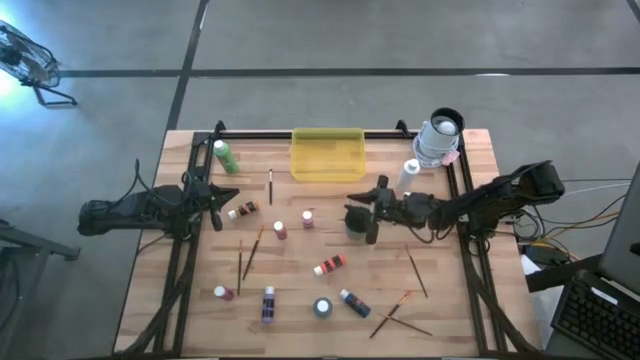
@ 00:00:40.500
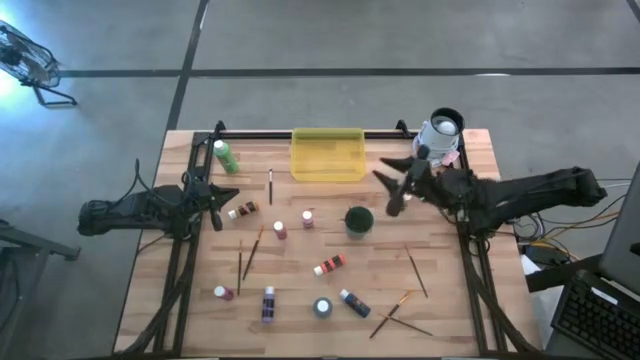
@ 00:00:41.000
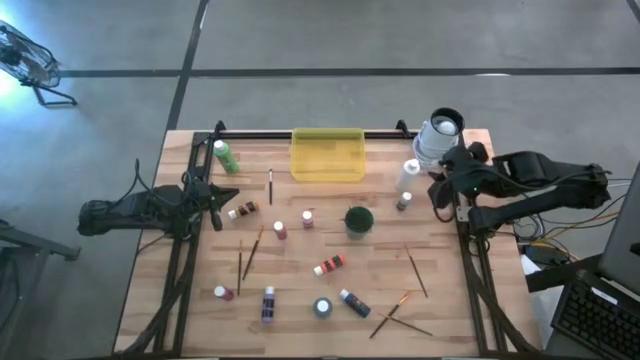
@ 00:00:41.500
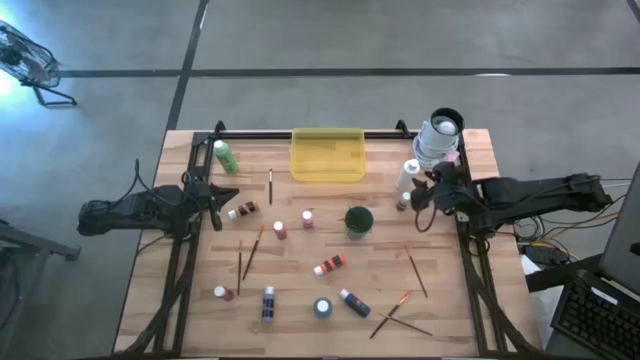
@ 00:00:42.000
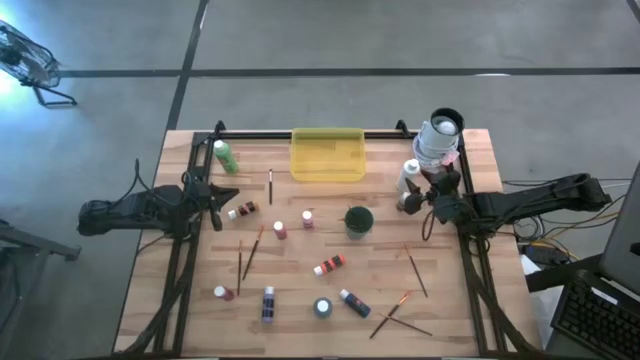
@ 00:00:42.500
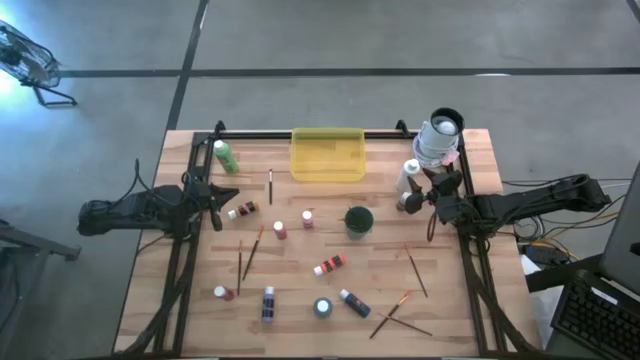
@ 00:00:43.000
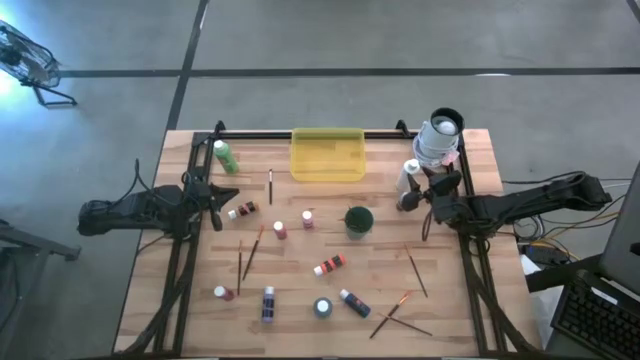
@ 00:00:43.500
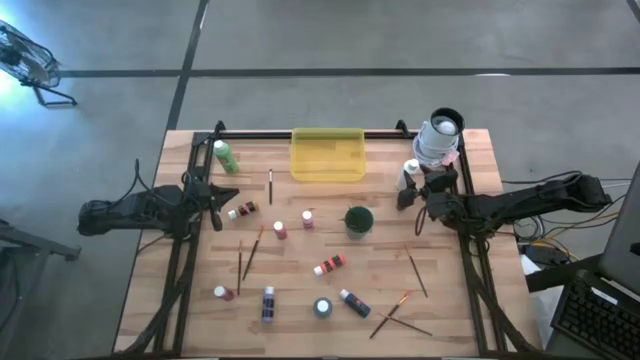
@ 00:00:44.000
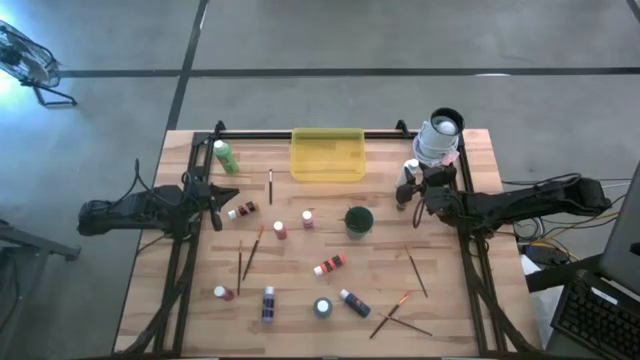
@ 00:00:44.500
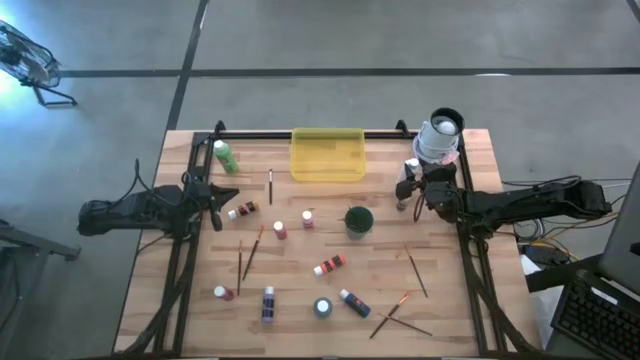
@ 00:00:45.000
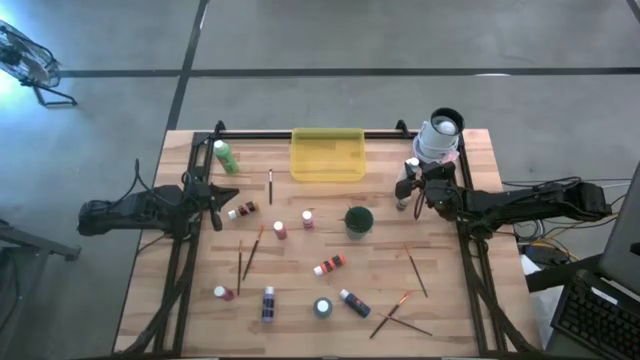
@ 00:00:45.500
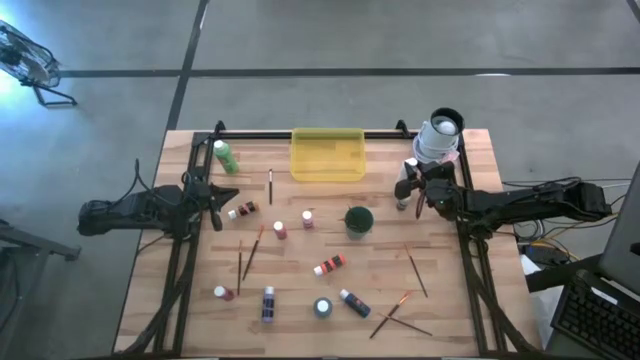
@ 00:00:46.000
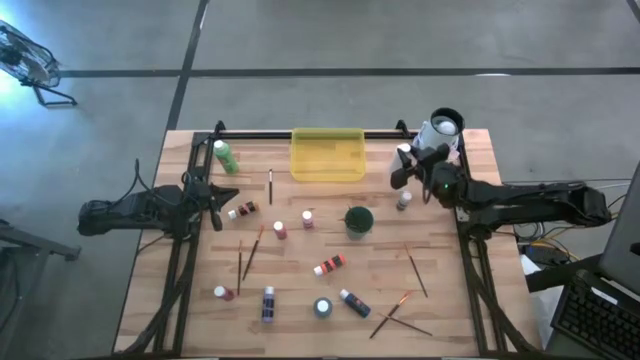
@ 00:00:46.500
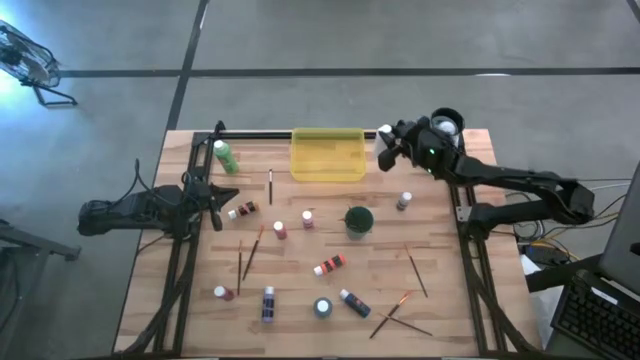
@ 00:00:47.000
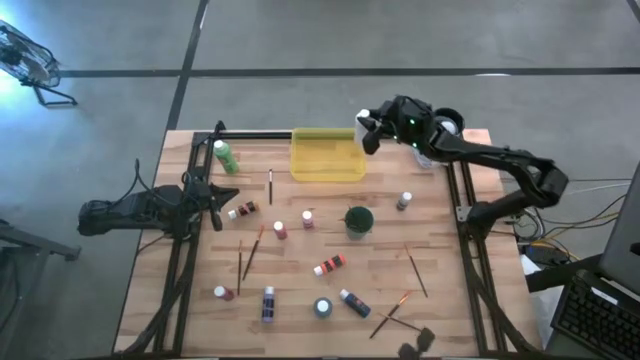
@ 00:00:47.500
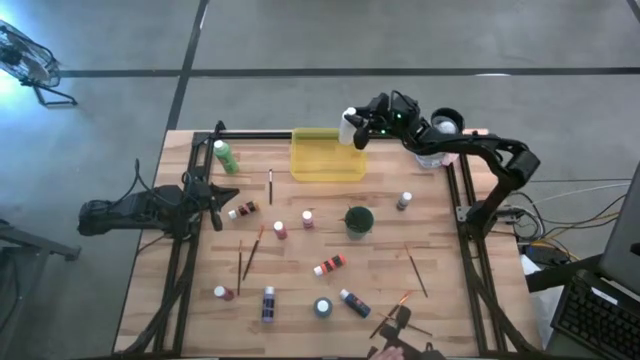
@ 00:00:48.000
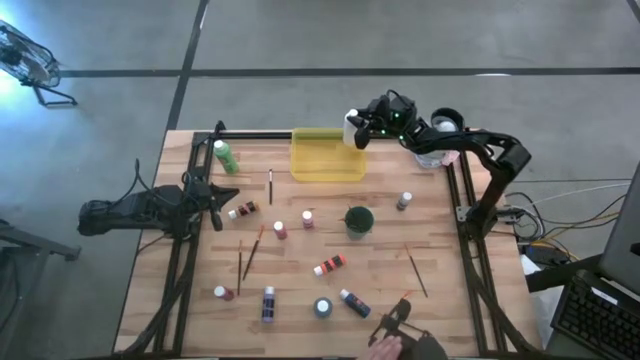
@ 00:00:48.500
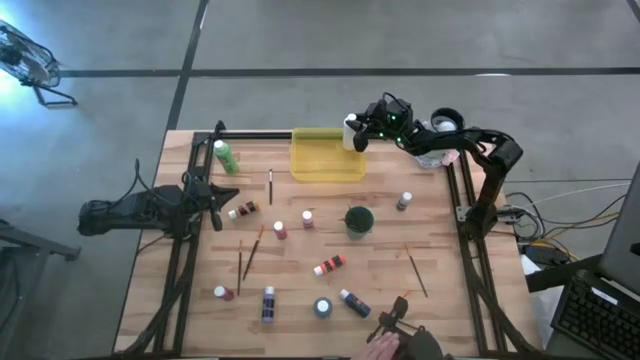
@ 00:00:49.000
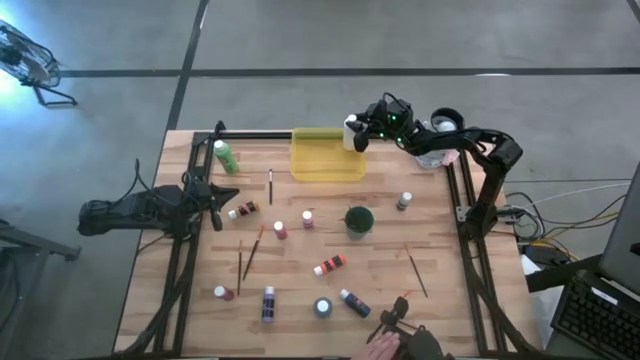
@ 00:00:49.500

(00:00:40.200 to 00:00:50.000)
Task: Pick & Place Paint Supplies
Put the white paint bottle into the yellow bin

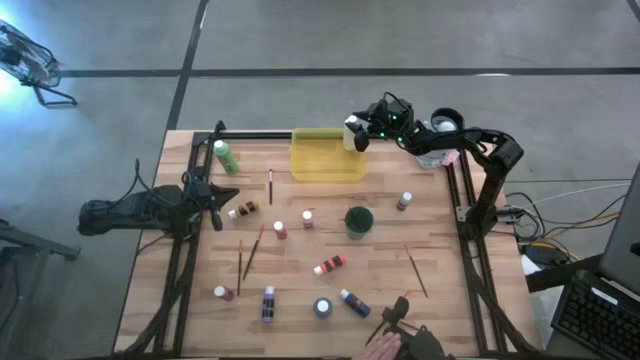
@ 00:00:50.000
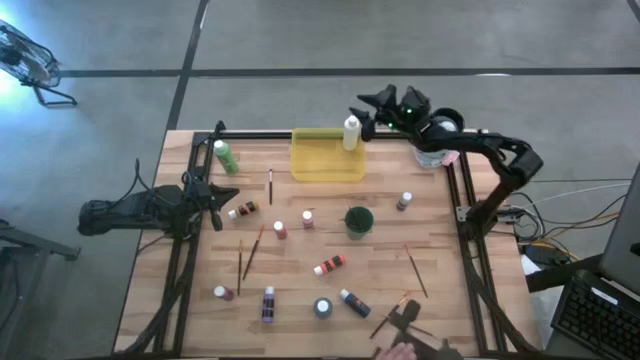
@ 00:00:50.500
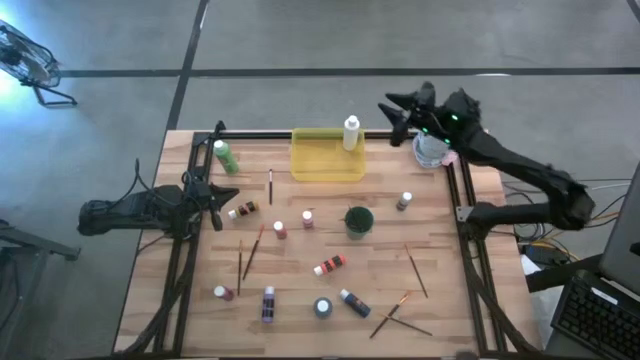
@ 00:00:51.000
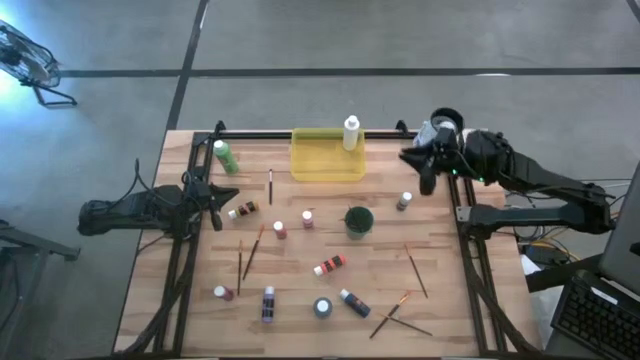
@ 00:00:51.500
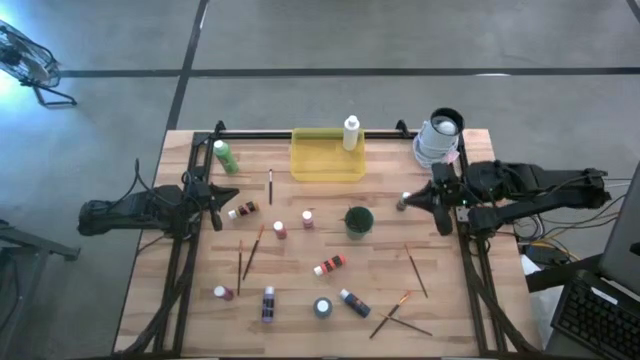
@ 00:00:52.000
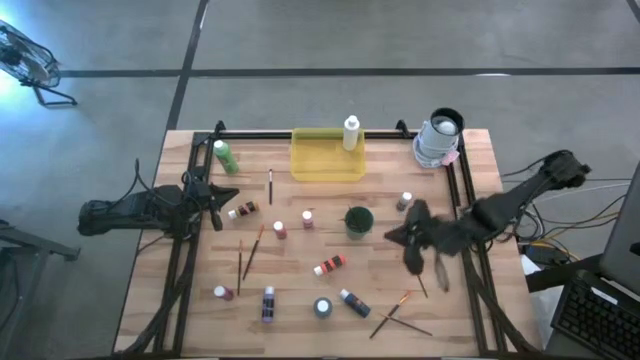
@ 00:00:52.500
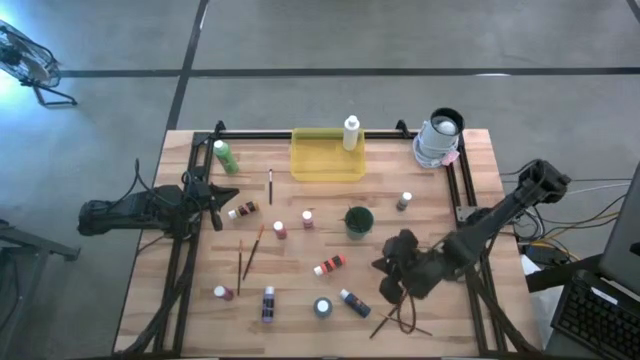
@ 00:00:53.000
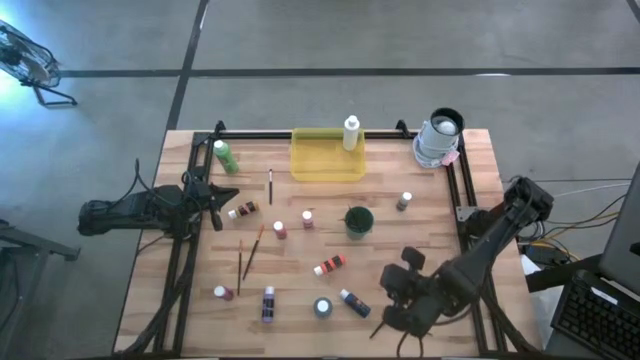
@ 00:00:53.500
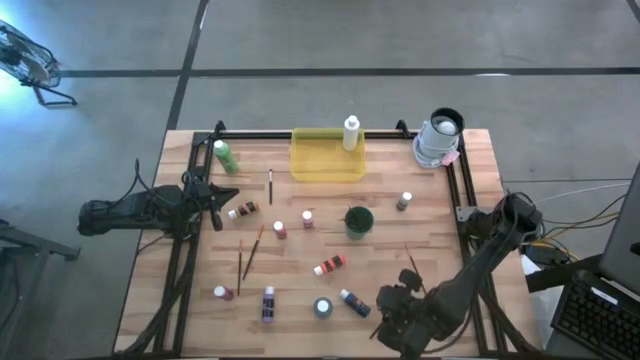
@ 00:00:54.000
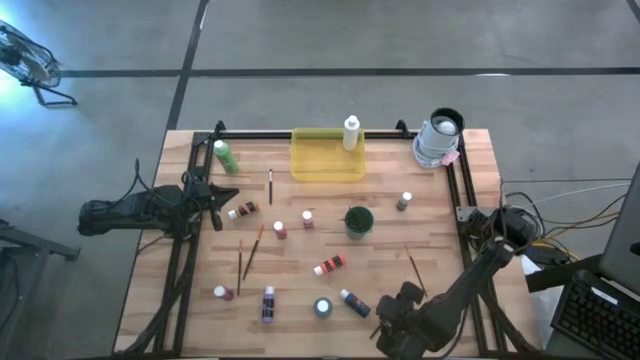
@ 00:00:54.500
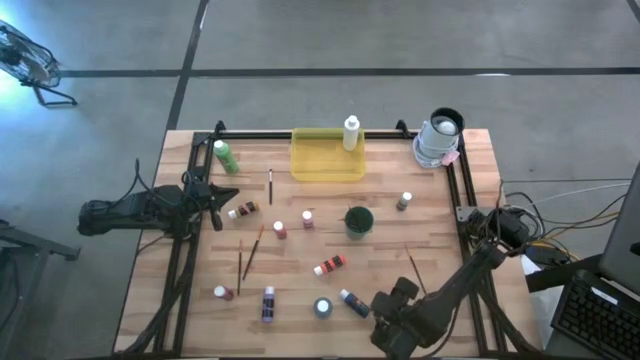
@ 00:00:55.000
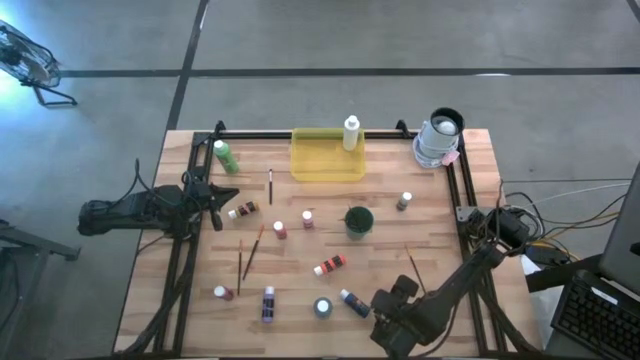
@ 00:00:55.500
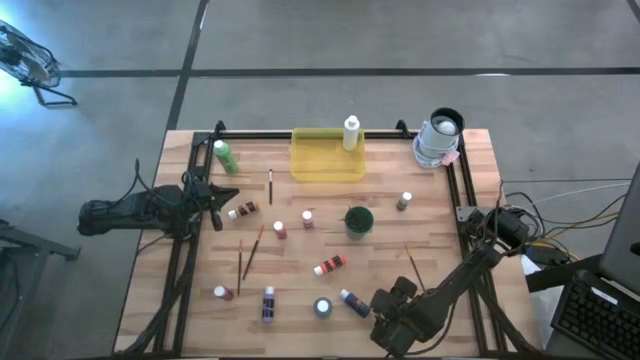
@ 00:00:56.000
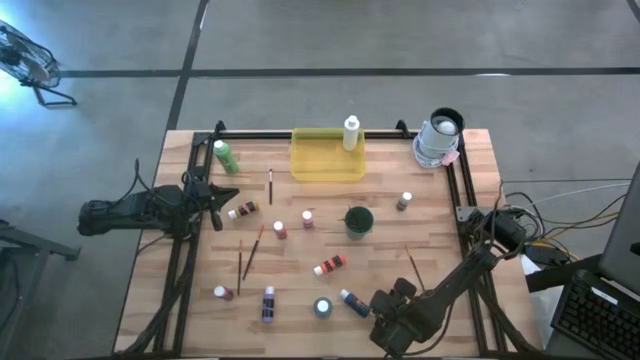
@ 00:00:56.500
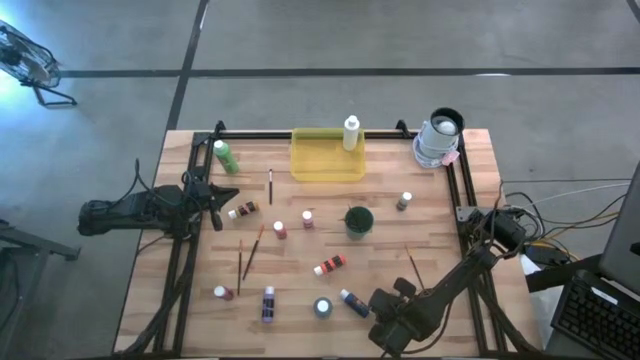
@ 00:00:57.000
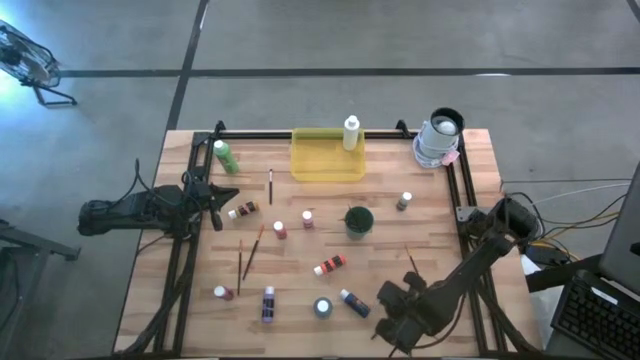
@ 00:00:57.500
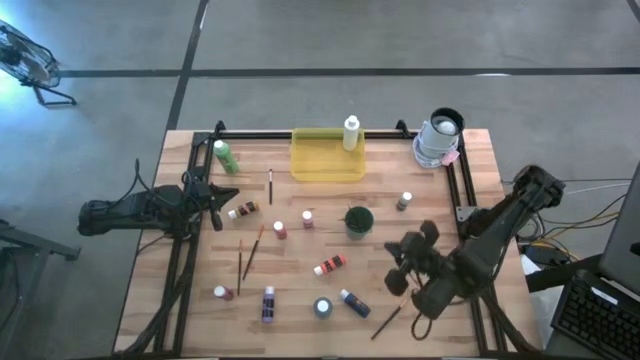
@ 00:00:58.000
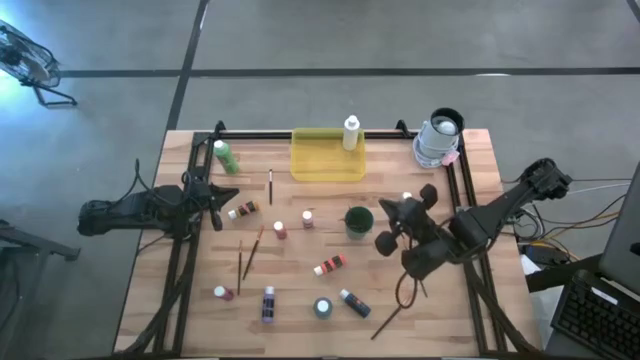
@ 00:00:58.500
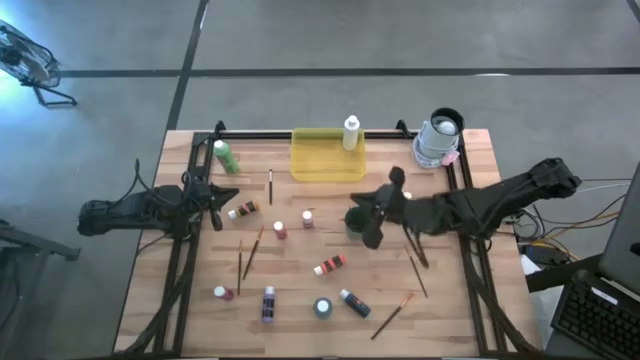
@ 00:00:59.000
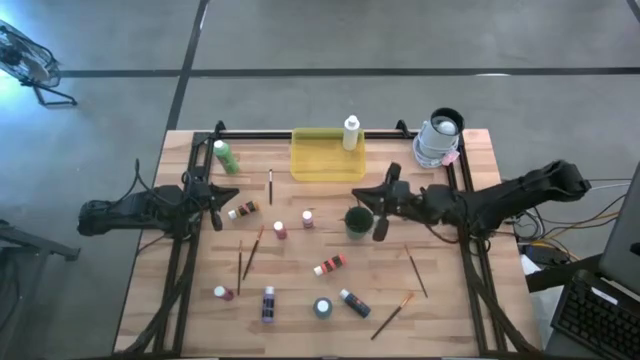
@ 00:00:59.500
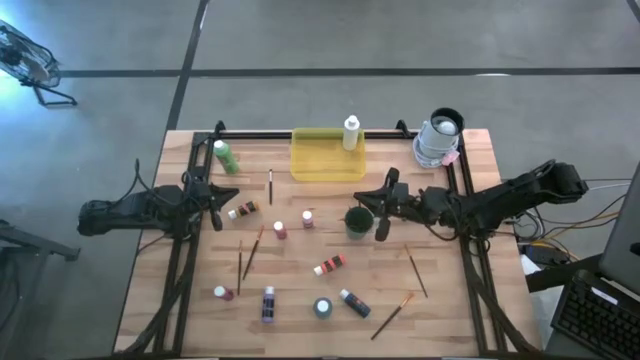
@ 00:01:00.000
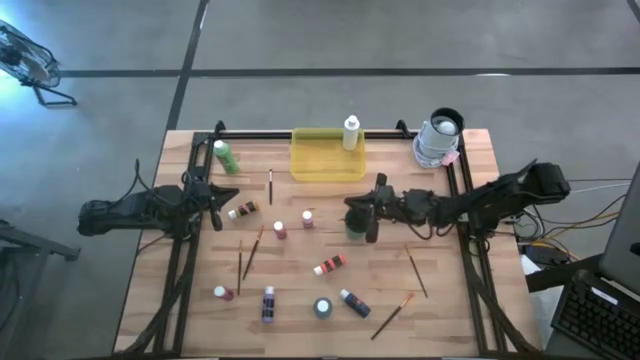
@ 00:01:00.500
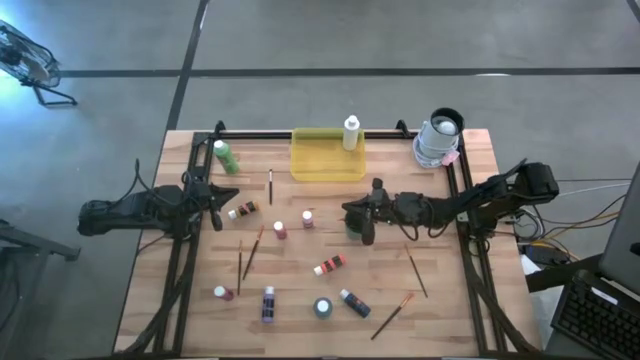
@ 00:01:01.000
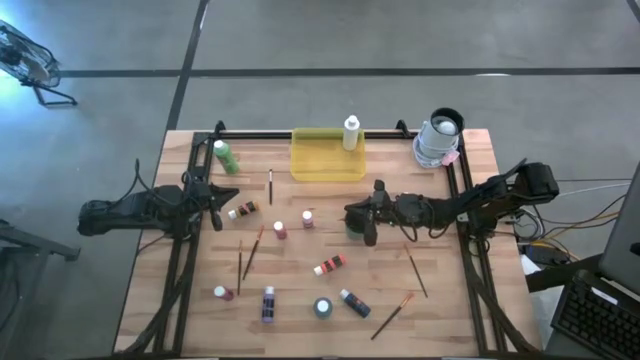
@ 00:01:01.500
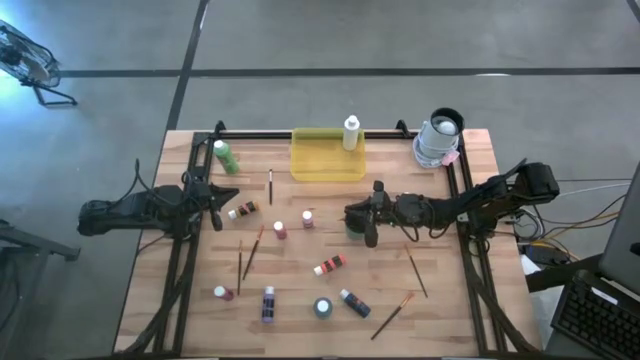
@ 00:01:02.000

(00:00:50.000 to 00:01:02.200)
Put the gold paint brush into the green cup
